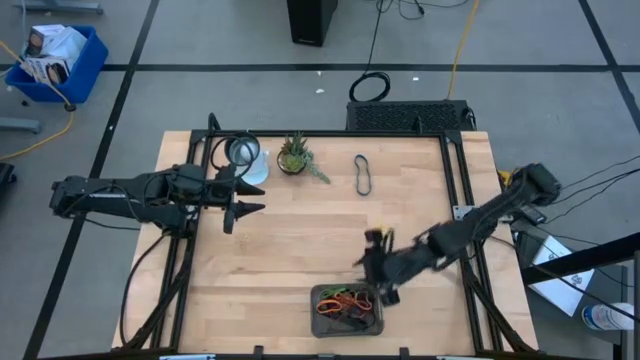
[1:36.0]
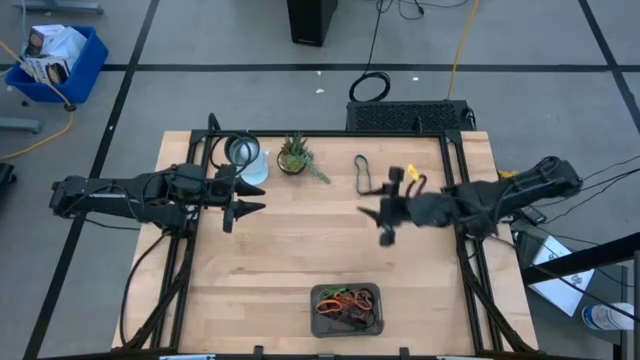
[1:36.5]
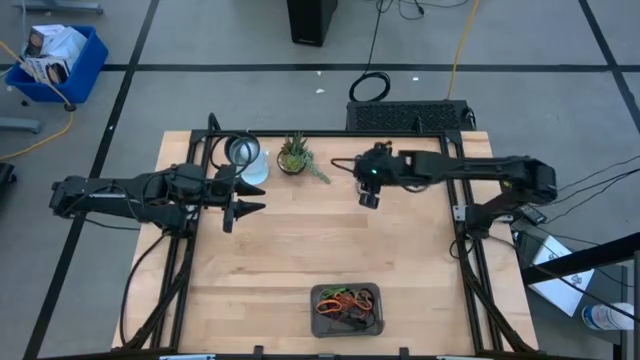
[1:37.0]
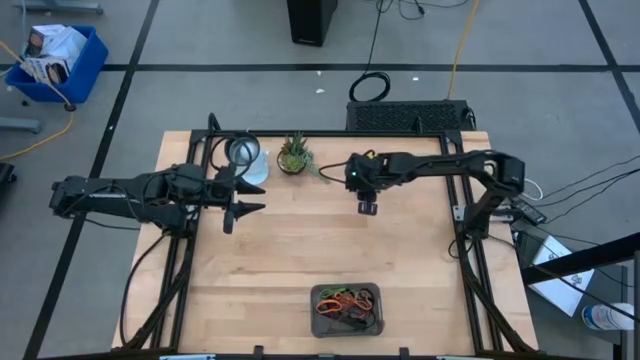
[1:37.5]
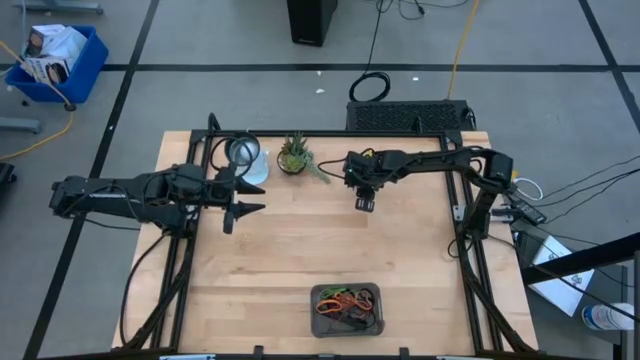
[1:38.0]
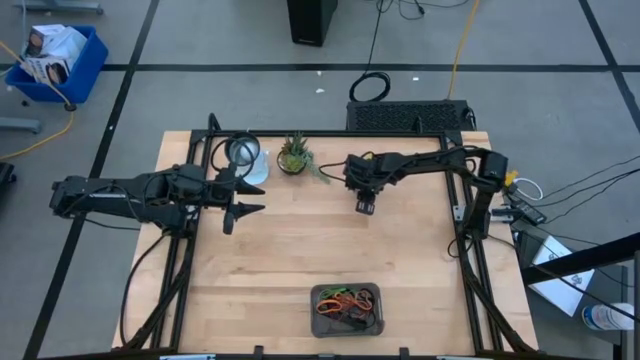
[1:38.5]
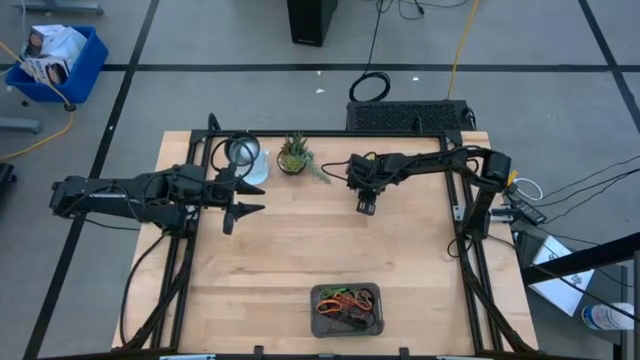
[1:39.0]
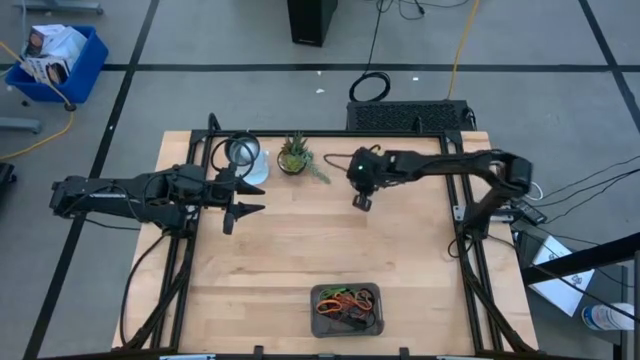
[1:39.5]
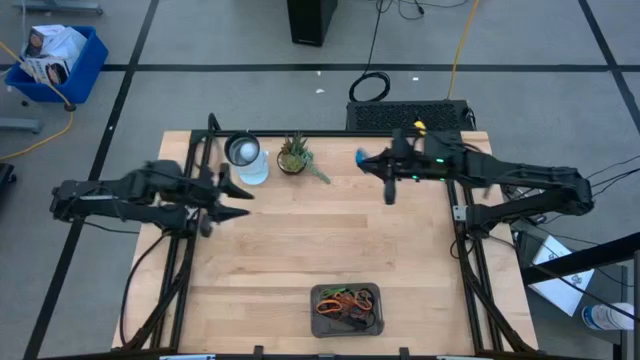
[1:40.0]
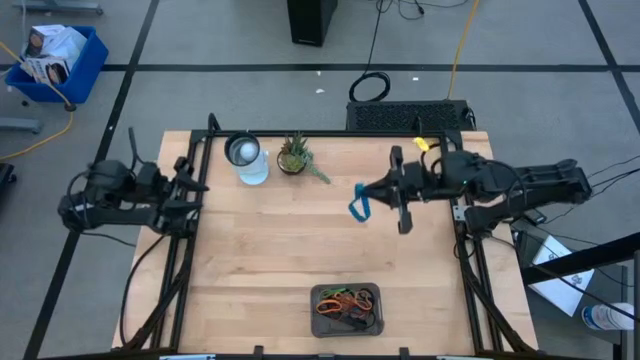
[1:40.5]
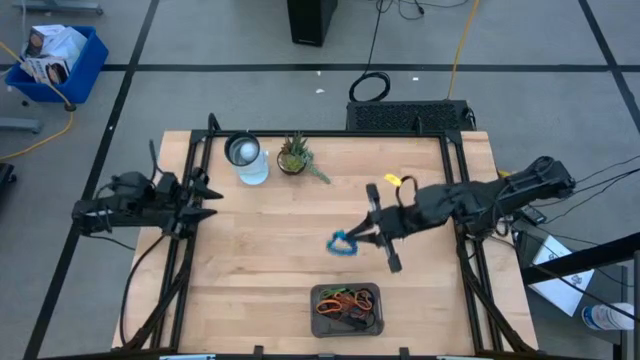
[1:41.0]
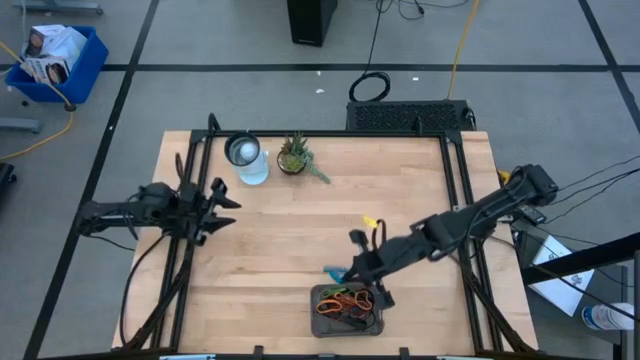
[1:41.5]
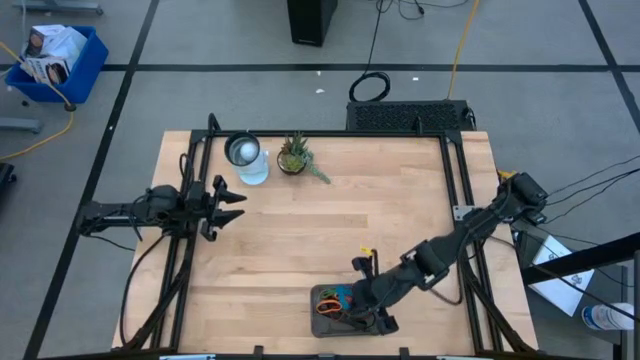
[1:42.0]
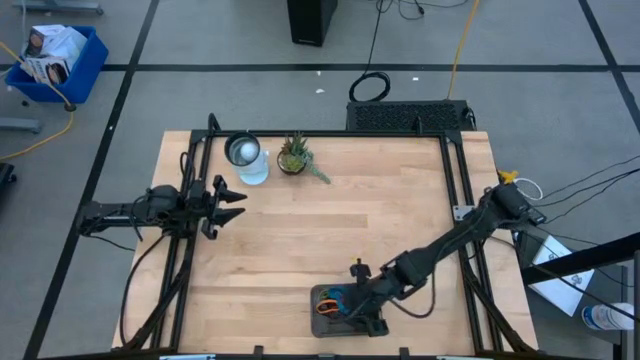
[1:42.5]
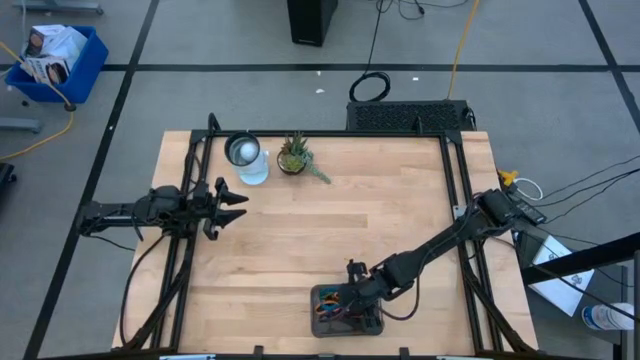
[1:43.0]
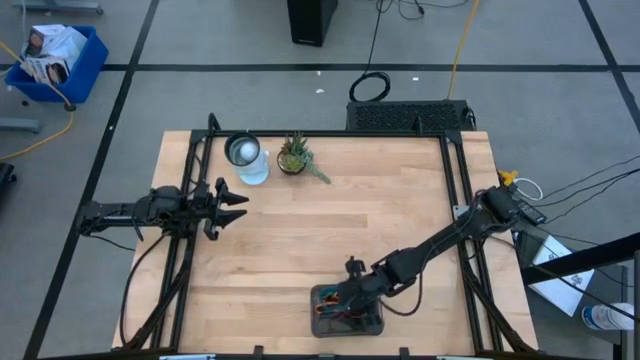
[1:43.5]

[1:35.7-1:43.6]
Task: Pick and place rubber bands into bin
Put the blue rubber band into the black transparent bin

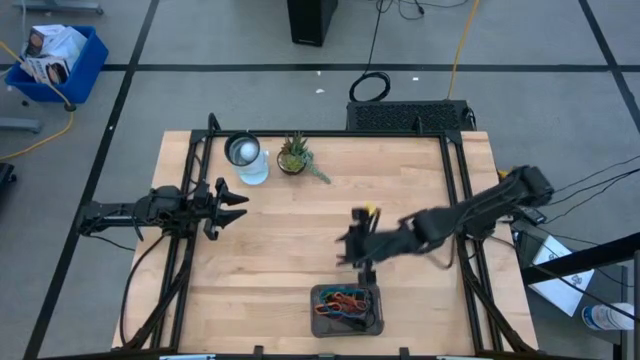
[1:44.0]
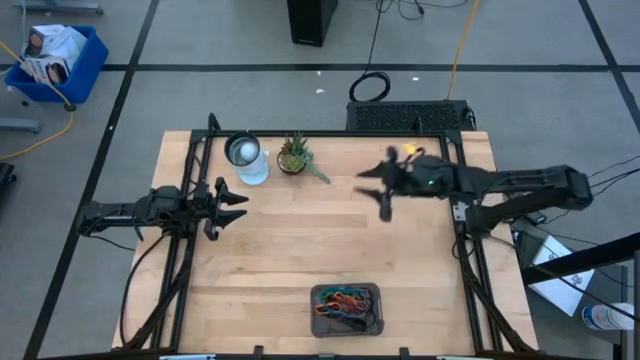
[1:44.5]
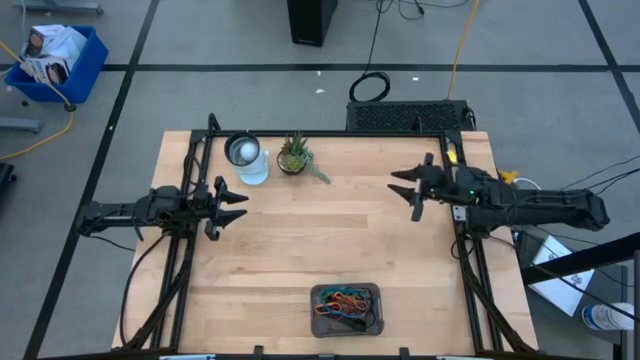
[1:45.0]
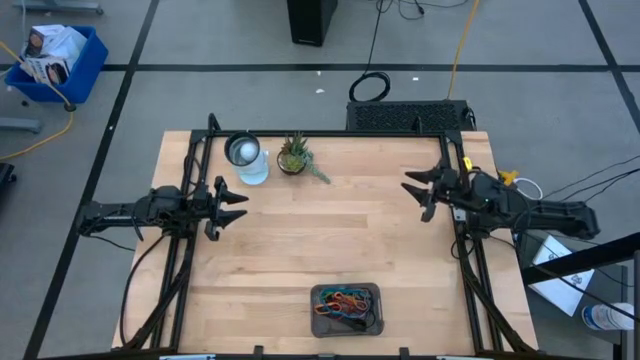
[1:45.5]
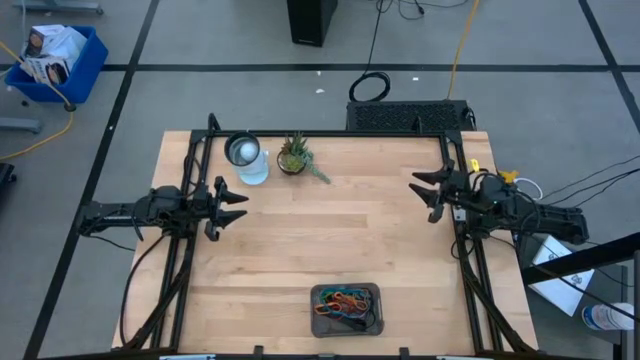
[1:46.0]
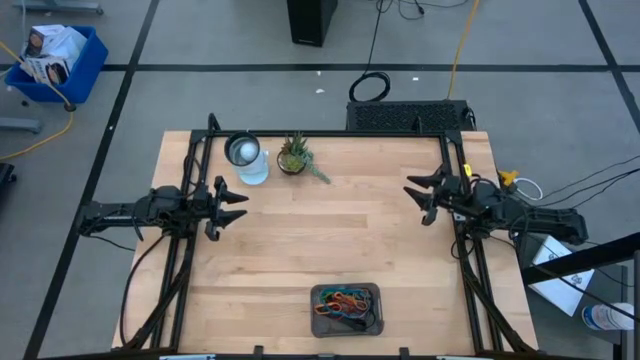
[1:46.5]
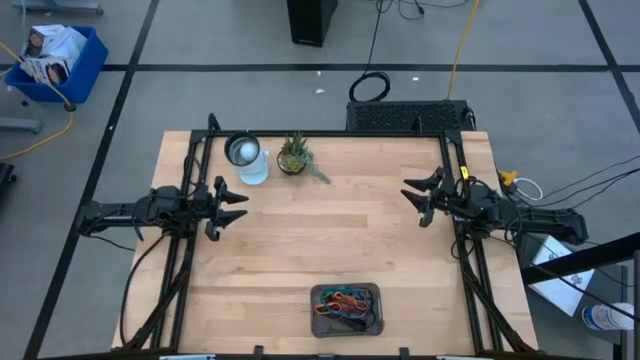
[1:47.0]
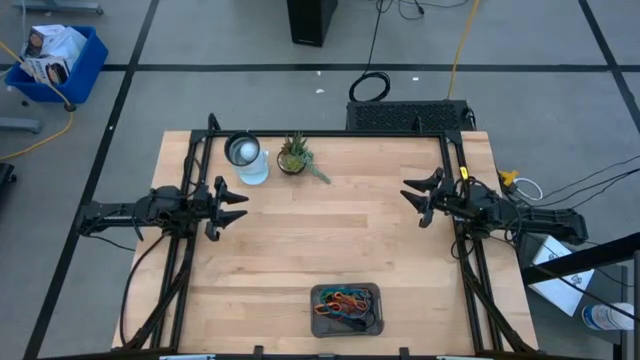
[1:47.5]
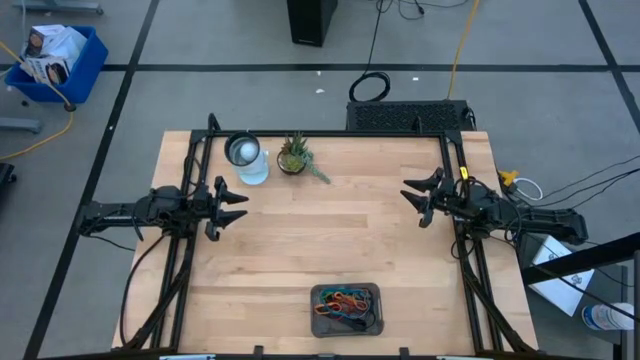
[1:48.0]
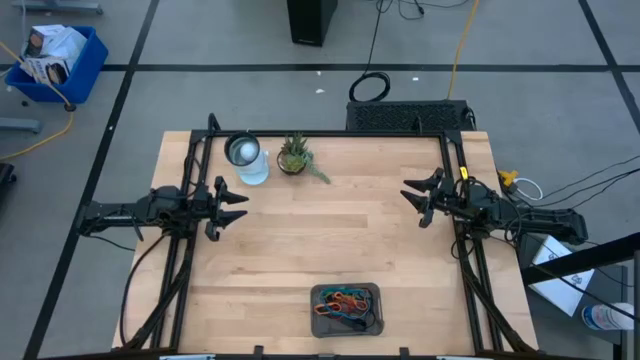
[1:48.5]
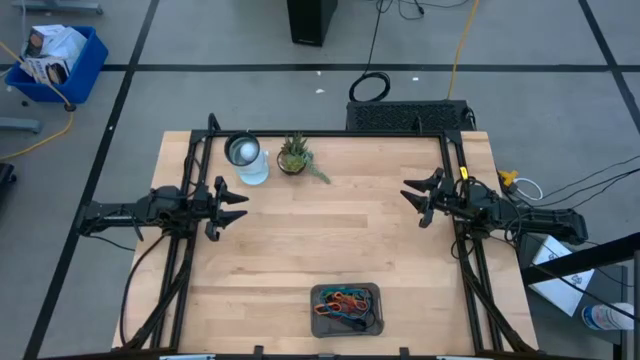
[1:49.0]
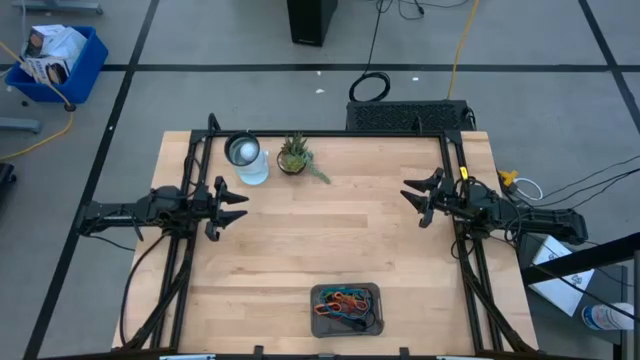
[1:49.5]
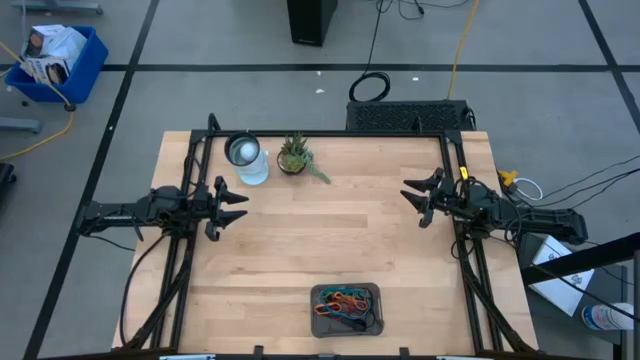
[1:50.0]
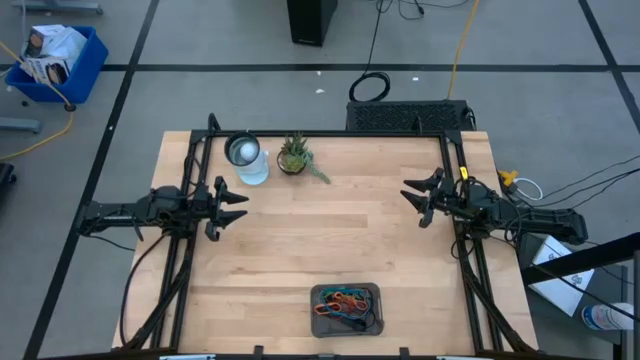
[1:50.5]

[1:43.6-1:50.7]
Return to Home Position

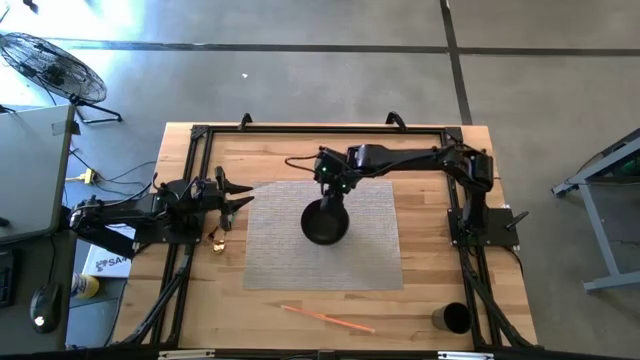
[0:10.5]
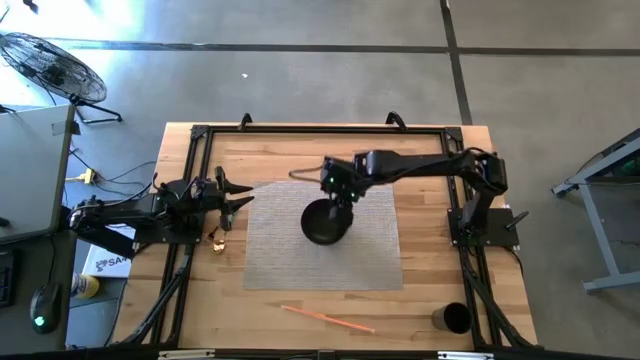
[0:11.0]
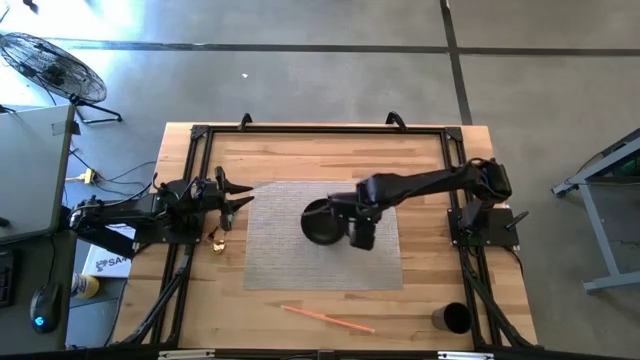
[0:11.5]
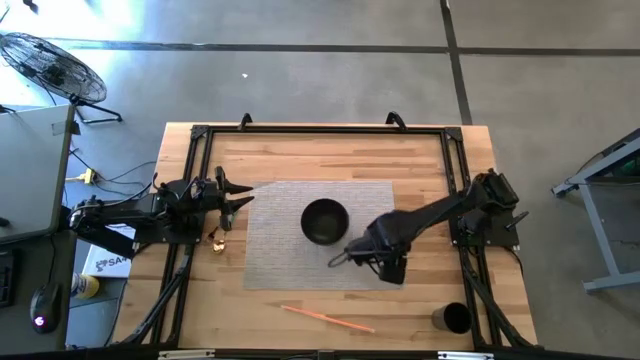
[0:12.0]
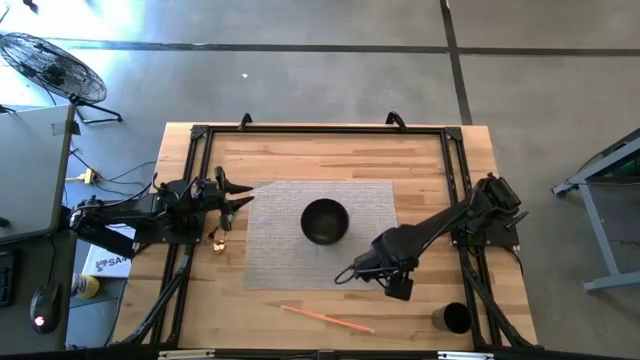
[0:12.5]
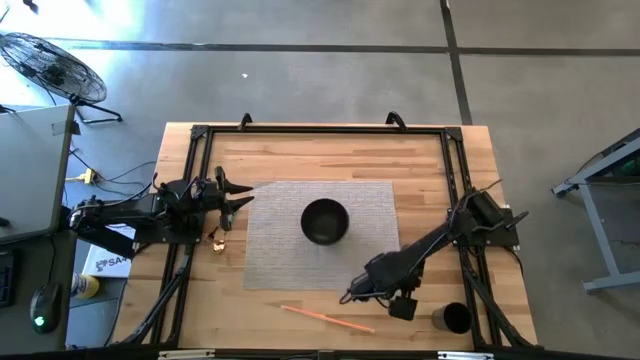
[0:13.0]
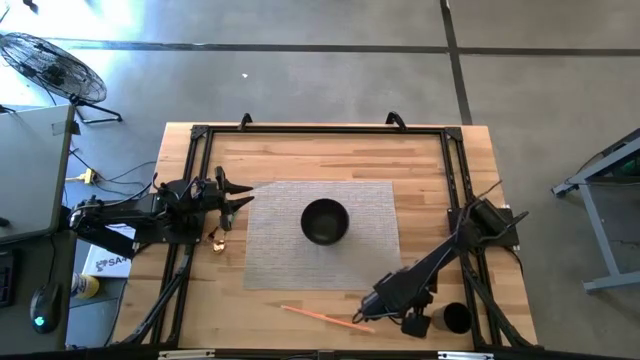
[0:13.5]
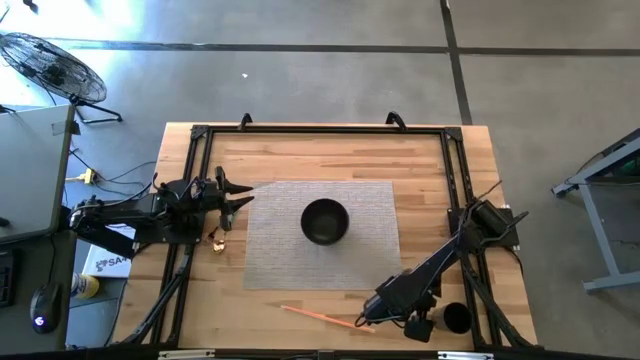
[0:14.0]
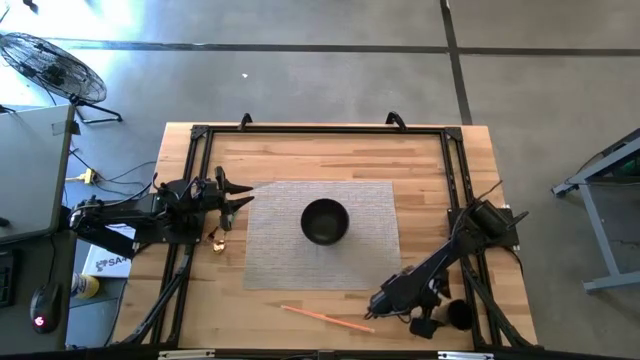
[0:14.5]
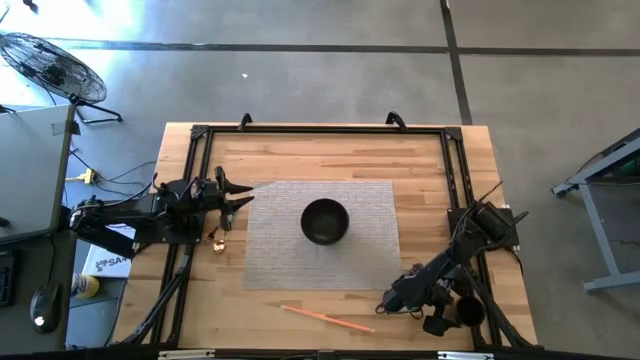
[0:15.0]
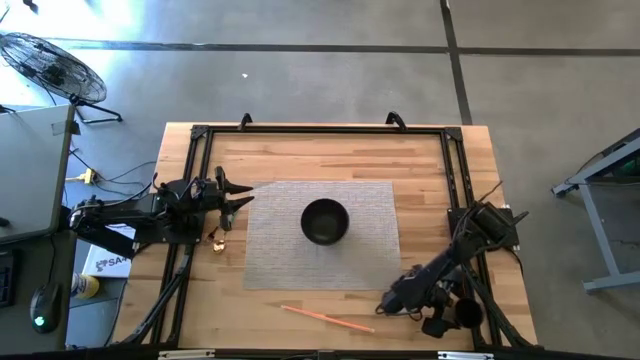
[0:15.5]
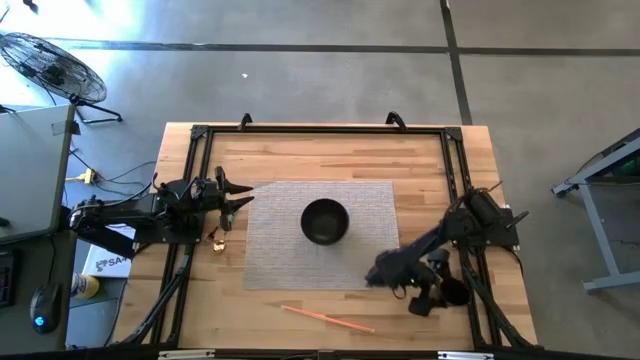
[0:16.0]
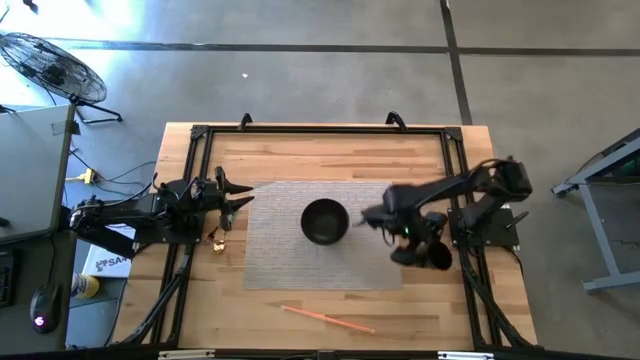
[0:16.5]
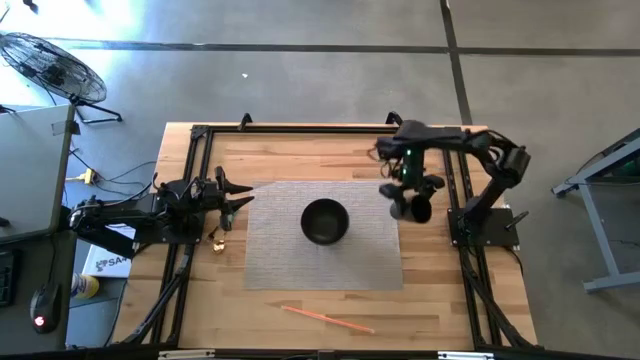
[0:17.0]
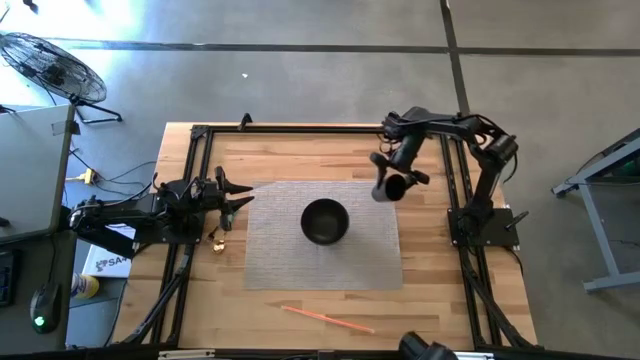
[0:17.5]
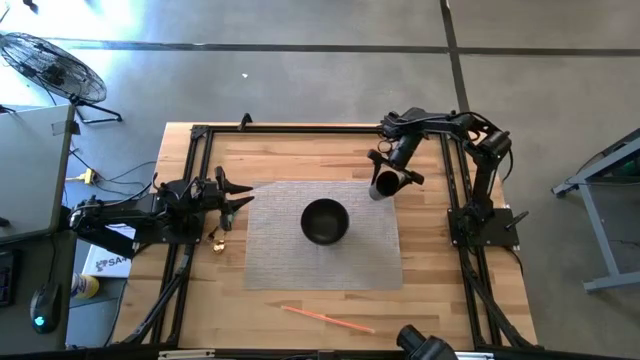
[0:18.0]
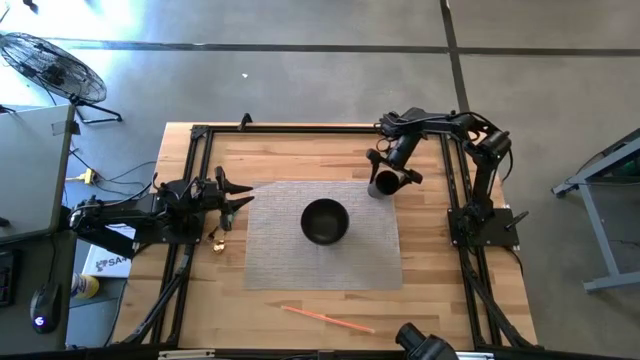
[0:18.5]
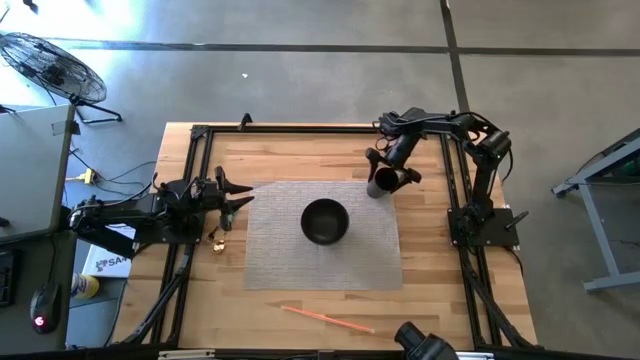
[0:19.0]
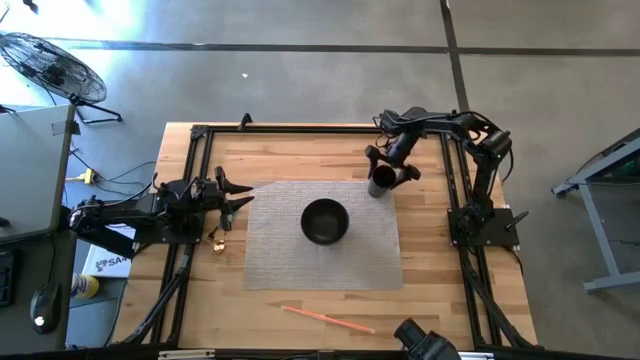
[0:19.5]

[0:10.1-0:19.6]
Task: Pick & Place Utensil
Put the black cup on the gray mat to the top right of the black bowl
